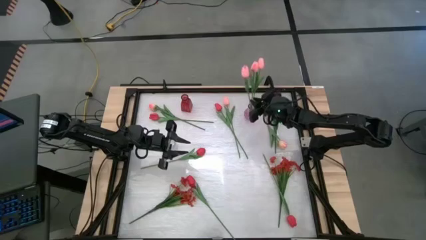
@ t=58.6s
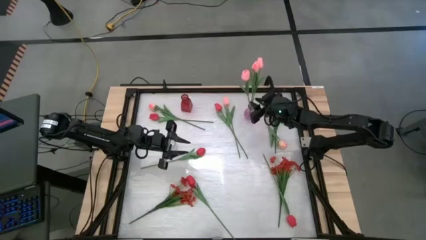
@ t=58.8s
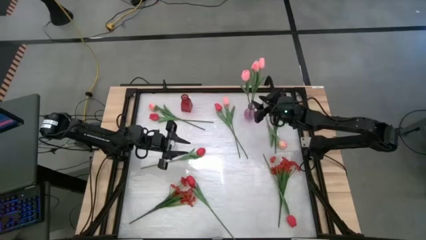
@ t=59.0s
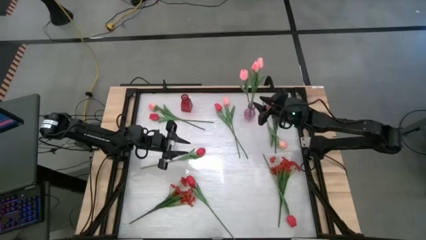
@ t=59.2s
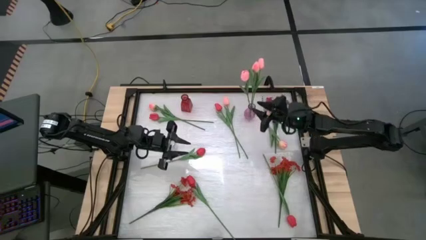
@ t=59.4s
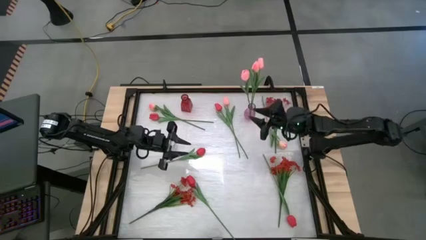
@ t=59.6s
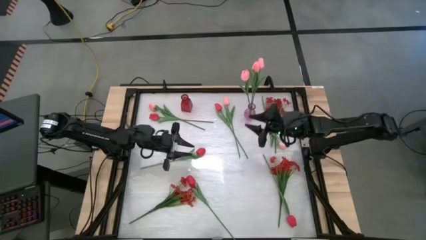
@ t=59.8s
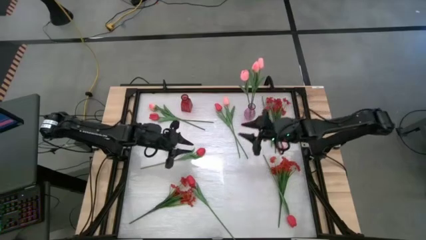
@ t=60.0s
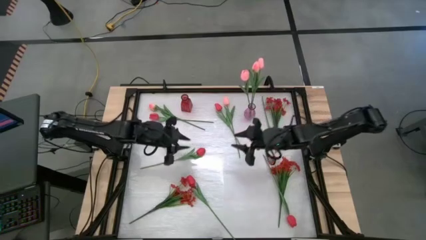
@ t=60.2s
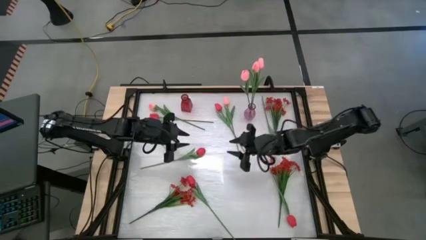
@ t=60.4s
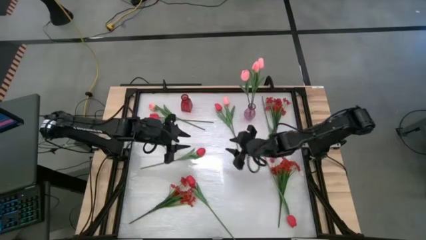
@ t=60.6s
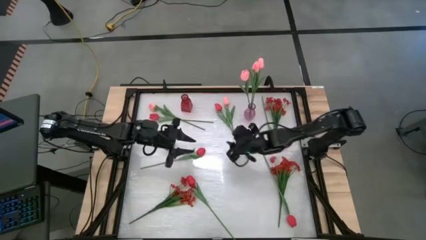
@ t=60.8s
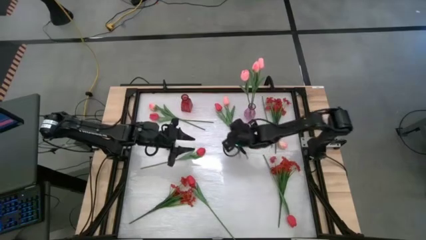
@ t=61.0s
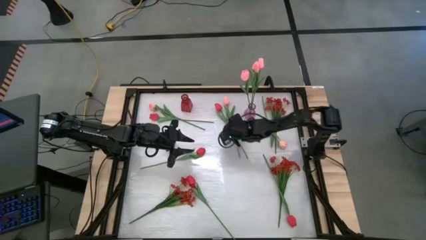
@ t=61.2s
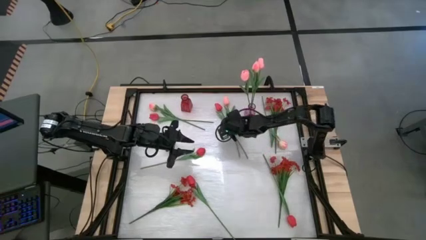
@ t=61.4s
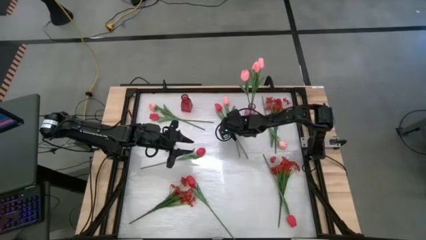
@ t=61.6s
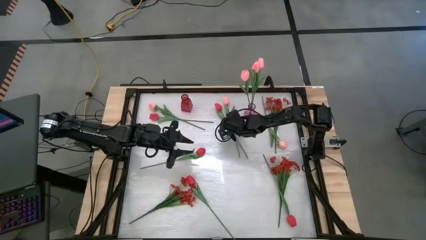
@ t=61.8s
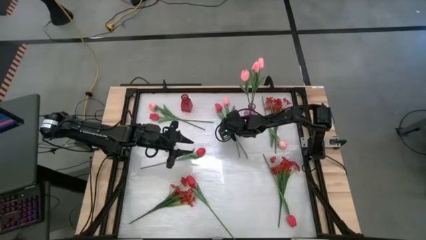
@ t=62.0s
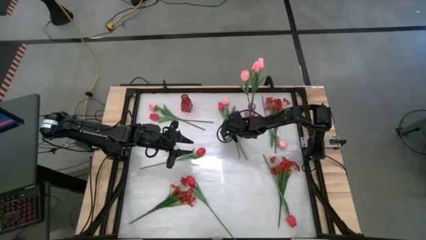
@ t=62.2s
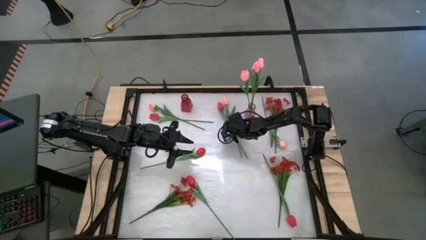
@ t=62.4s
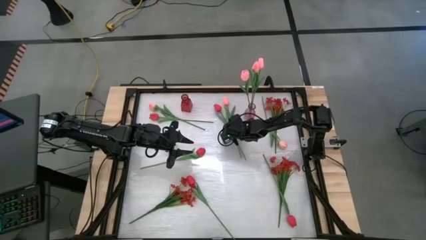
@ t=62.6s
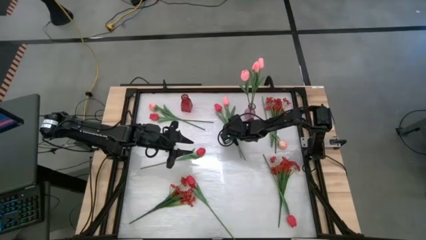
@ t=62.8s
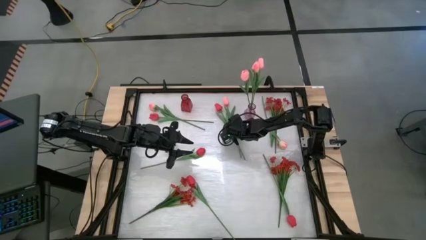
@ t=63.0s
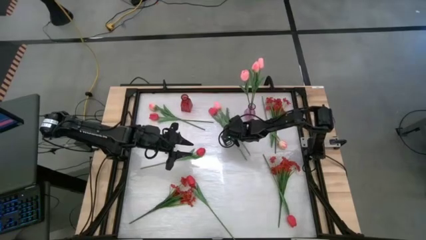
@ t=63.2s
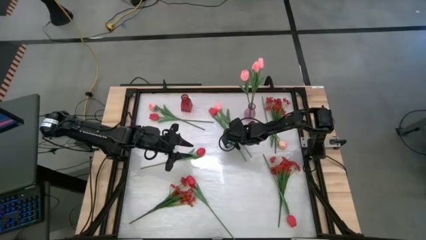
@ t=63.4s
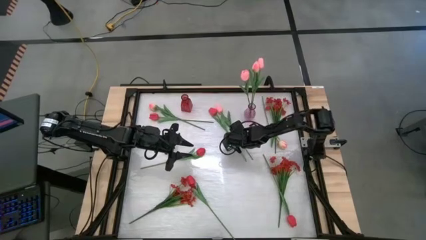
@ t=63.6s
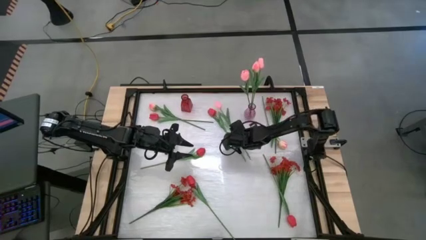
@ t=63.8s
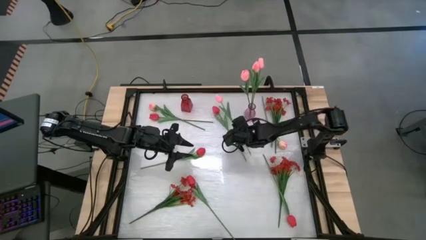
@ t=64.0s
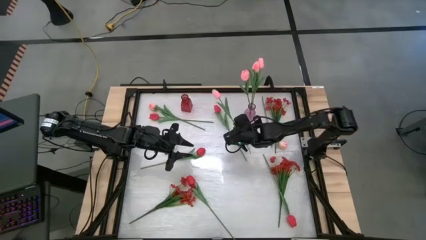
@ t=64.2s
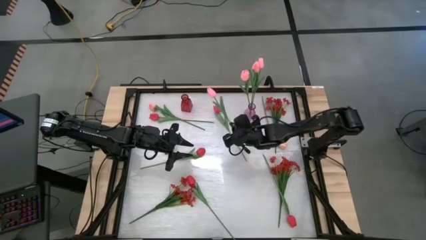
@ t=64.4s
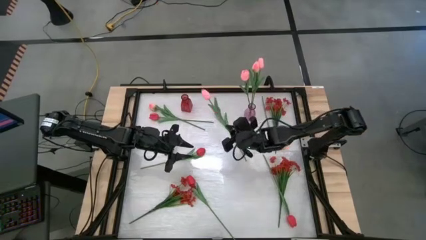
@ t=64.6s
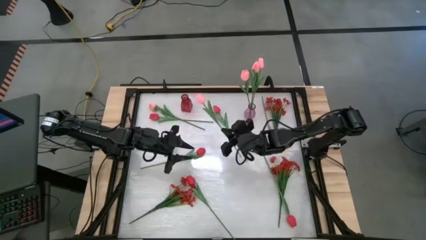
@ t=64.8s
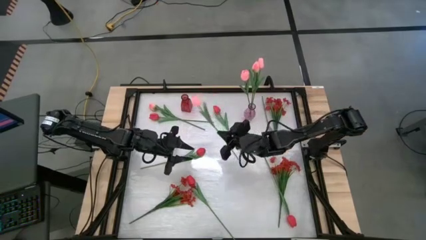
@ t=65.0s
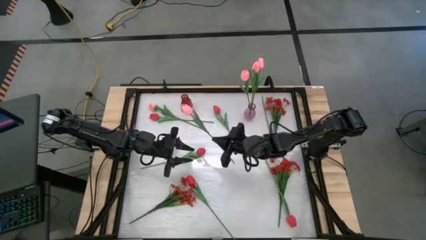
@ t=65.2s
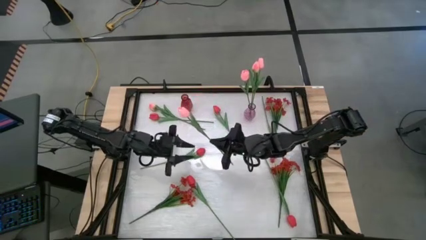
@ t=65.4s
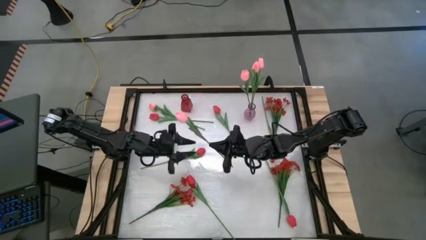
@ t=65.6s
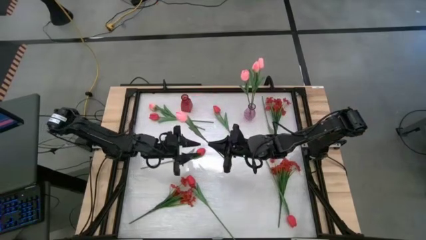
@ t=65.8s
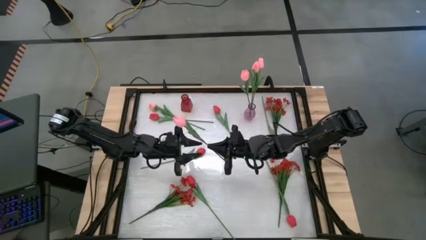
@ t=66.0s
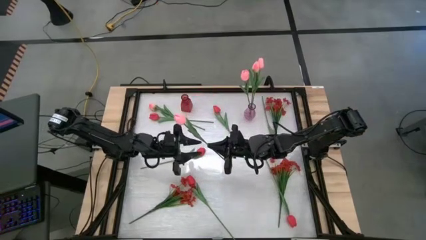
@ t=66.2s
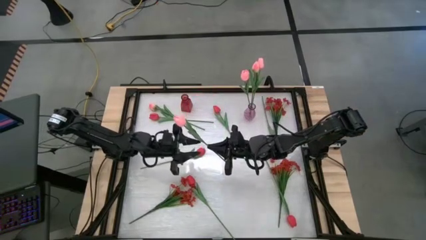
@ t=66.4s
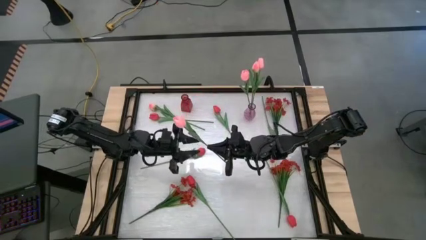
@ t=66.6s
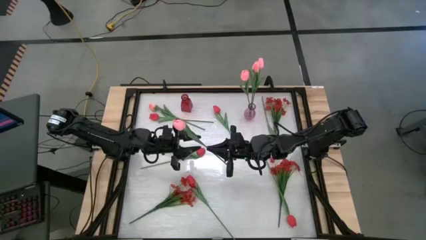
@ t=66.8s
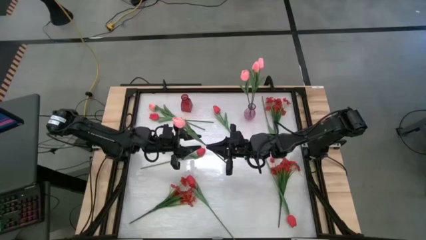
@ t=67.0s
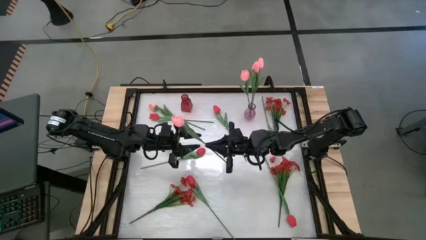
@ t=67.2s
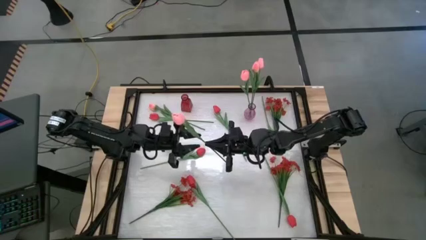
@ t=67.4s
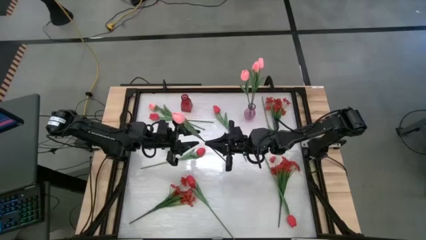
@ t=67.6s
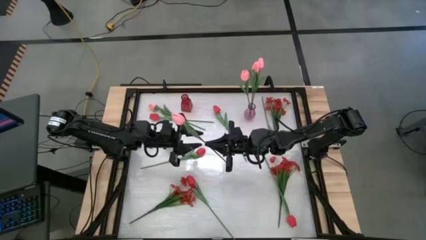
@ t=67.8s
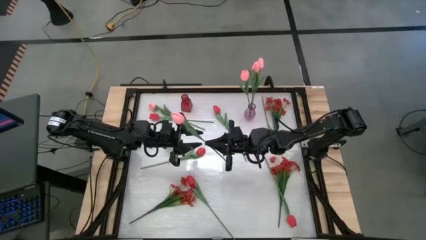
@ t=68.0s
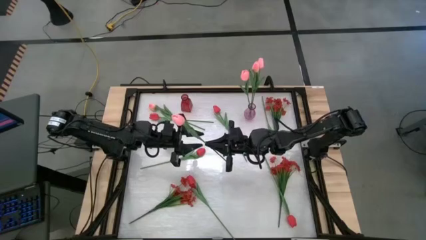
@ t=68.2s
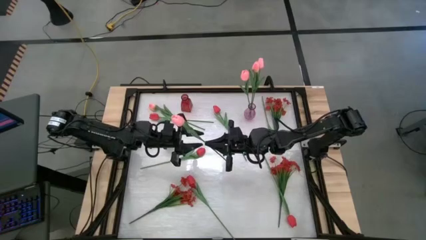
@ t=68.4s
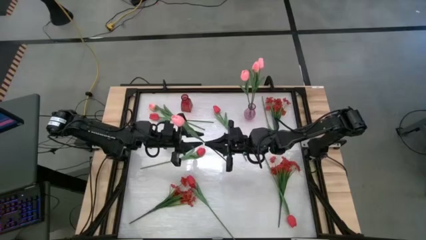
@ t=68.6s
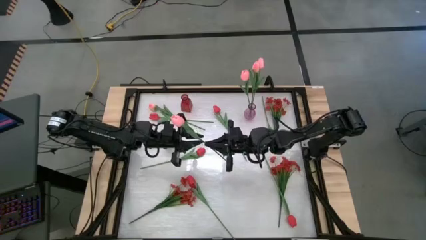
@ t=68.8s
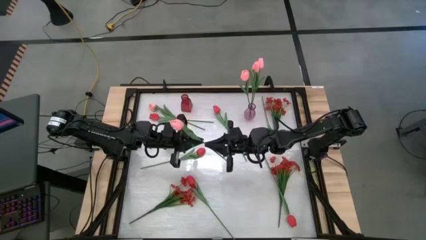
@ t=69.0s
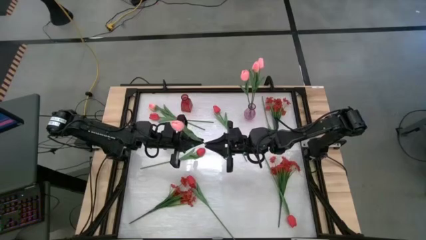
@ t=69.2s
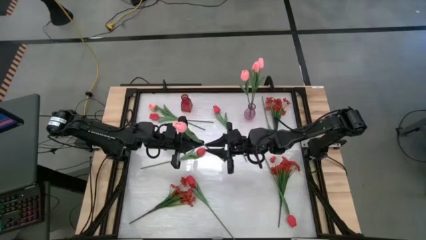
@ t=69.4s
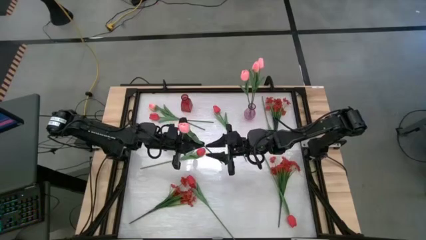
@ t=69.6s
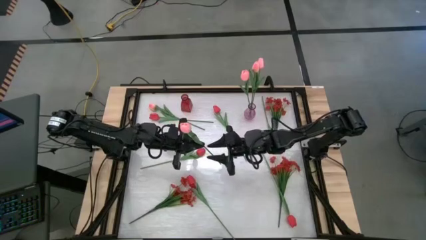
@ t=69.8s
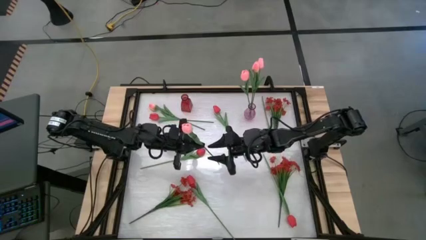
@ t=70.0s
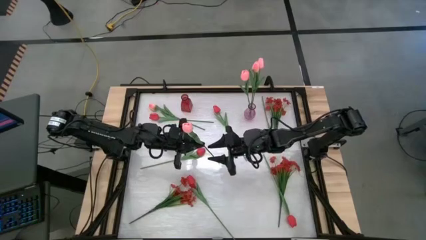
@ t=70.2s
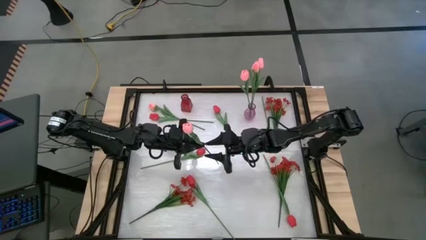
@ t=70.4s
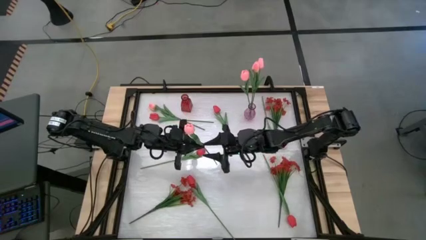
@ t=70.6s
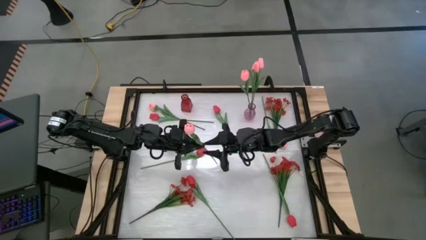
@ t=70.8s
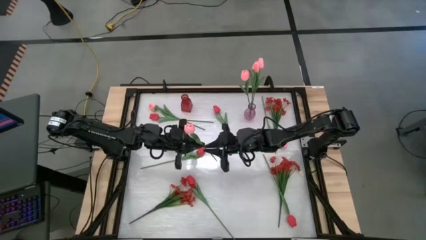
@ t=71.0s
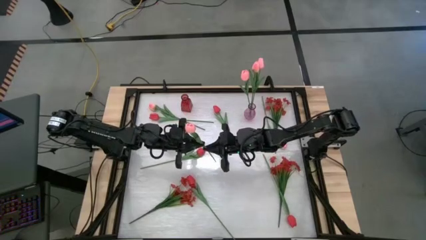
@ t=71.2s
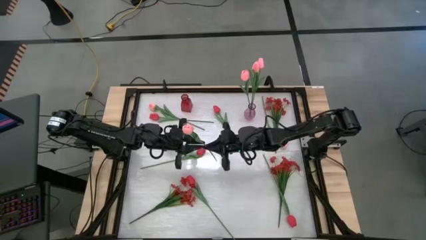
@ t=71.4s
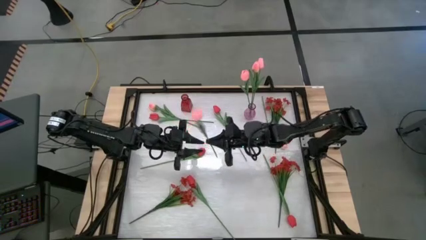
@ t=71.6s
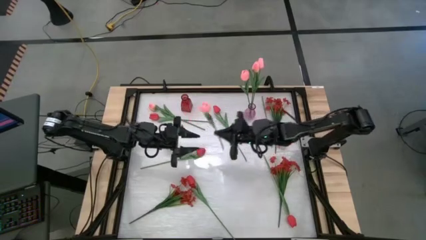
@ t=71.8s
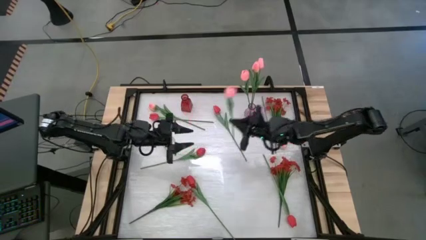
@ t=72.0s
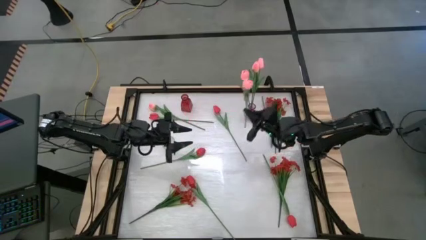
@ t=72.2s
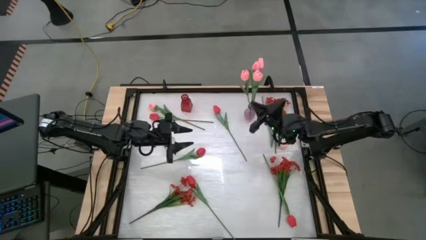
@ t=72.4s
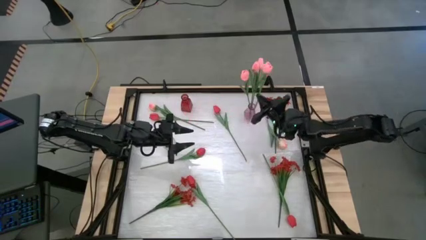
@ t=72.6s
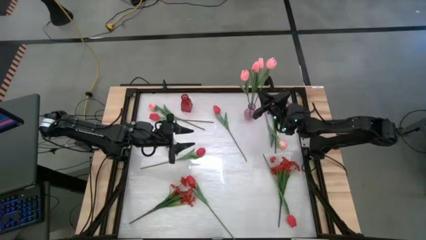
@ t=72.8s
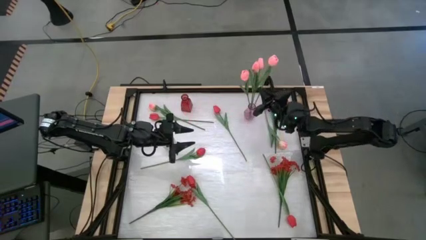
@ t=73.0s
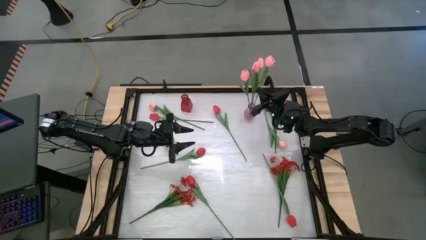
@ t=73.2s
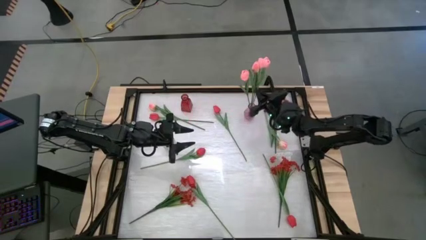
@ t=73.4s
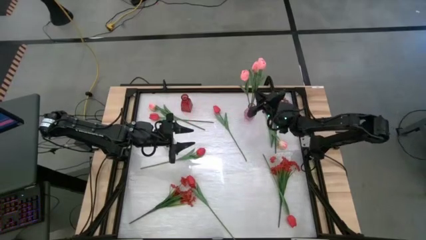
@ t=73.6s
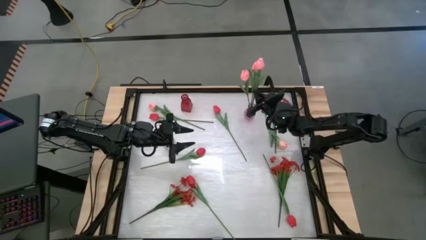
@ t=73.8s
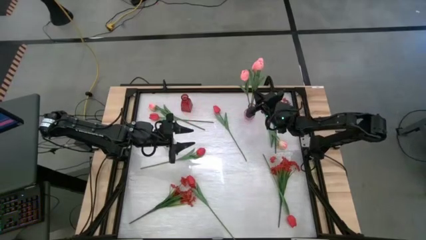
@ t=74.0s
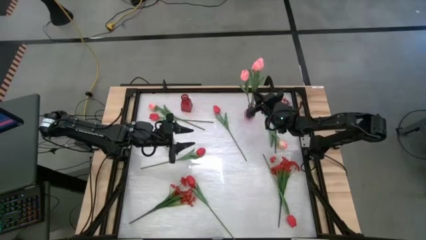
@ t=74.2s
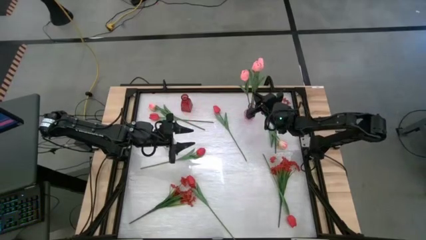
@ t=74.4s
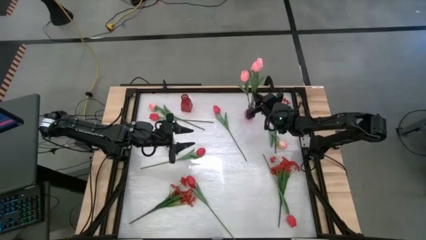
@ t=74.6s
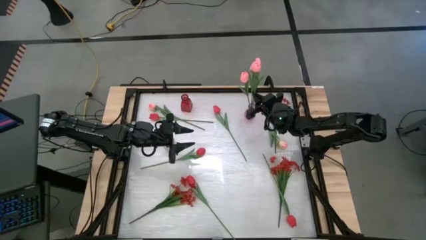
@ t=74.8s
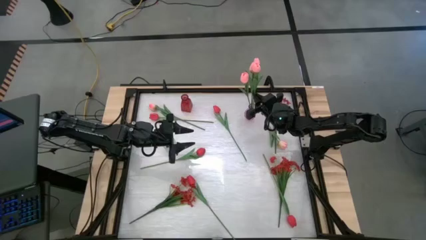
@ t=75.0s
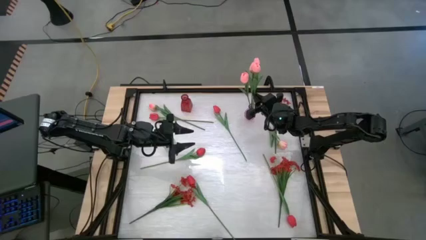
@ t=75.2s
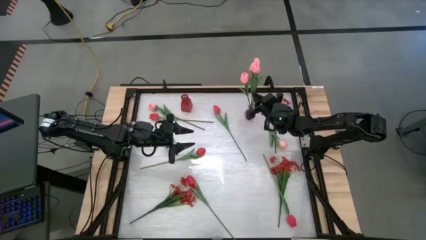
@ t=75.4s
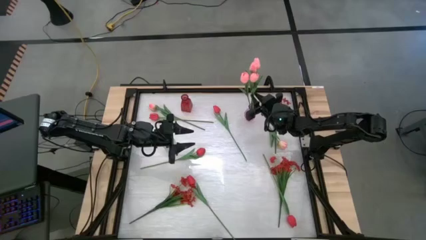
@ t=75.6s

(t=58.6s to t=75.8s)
Task: Sort flowers into vase by color
Put the pink tulip into the purple vase
